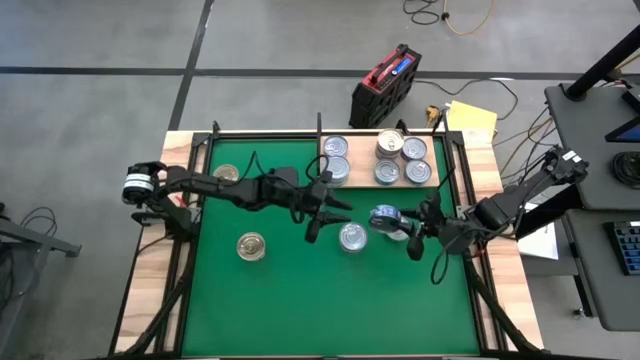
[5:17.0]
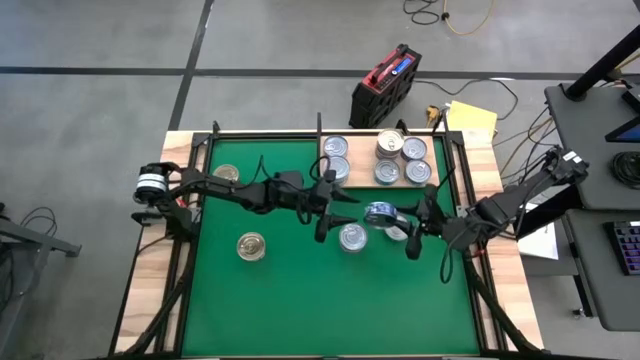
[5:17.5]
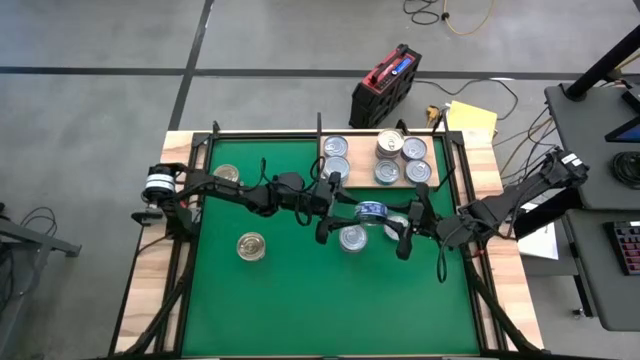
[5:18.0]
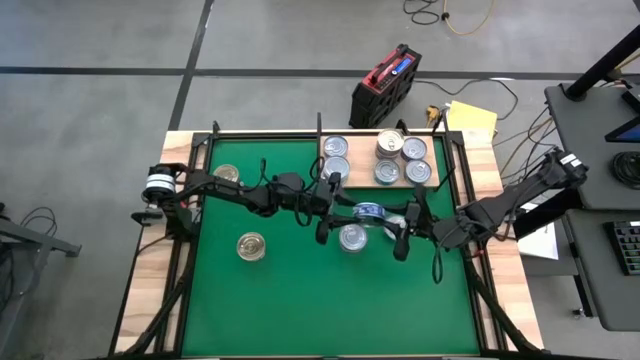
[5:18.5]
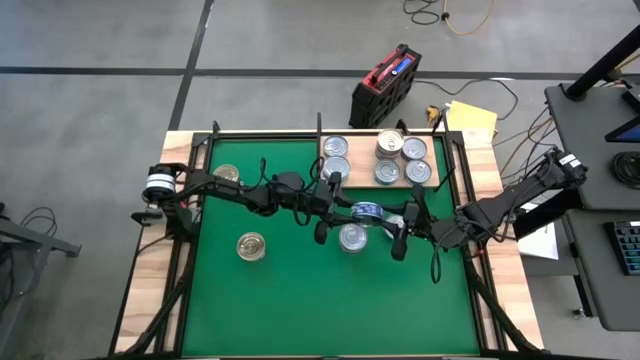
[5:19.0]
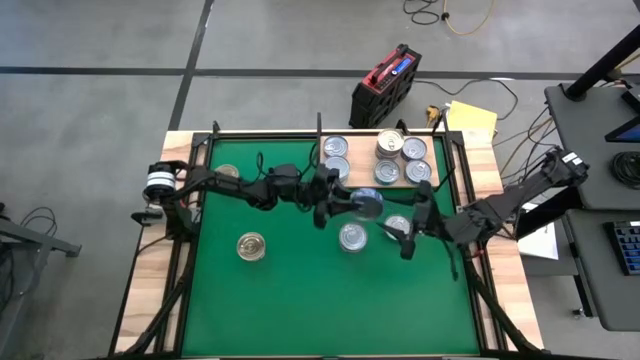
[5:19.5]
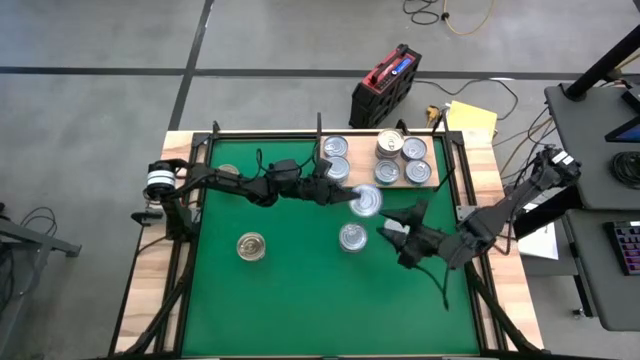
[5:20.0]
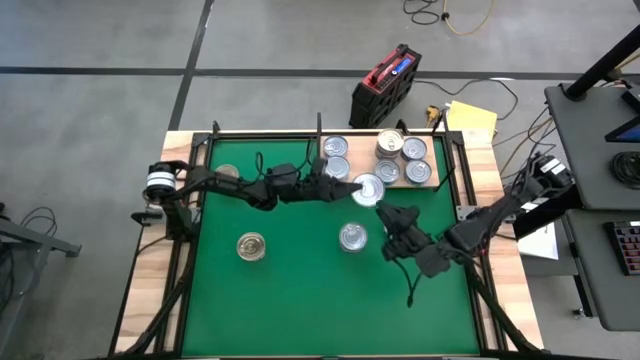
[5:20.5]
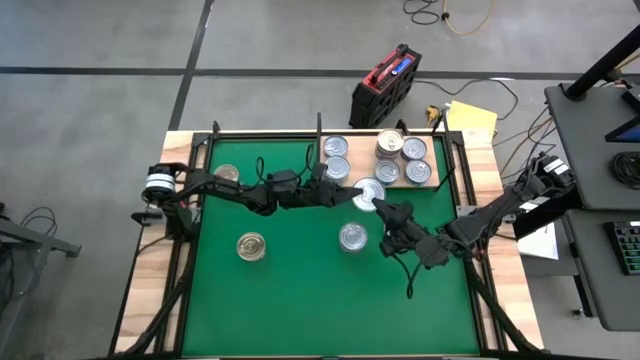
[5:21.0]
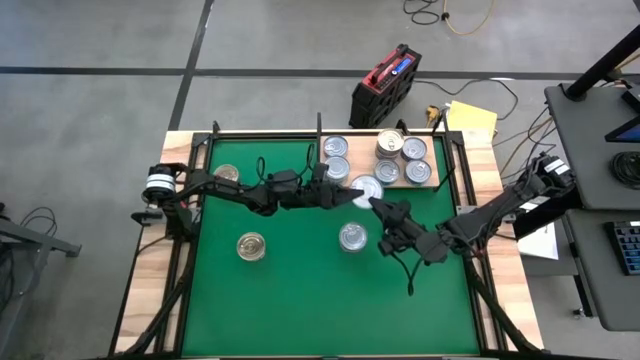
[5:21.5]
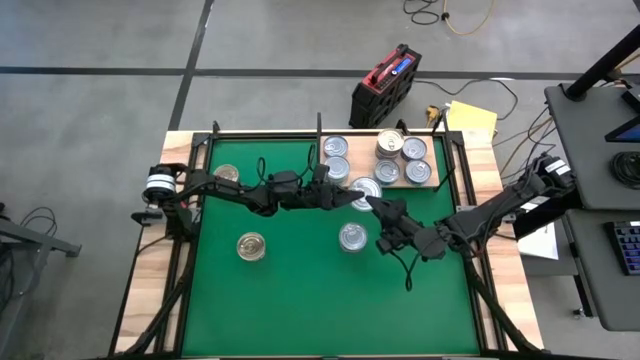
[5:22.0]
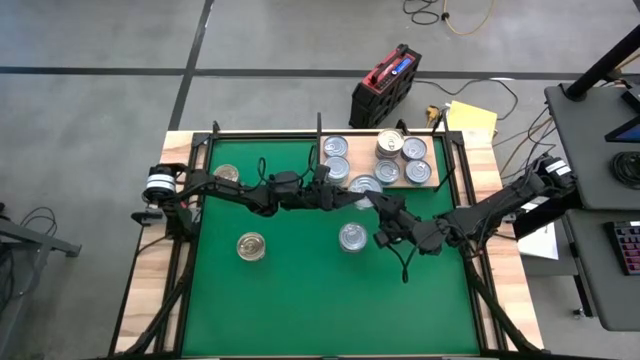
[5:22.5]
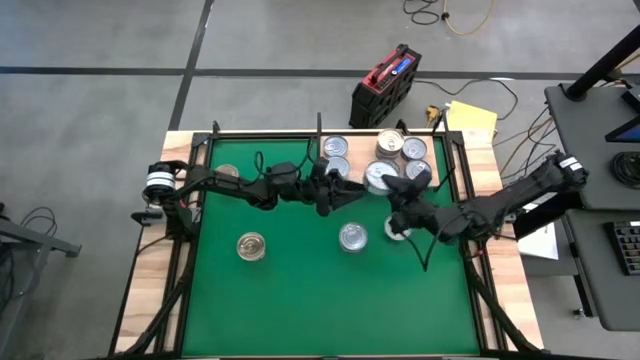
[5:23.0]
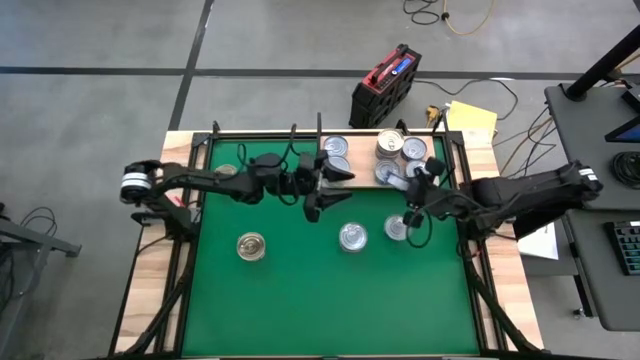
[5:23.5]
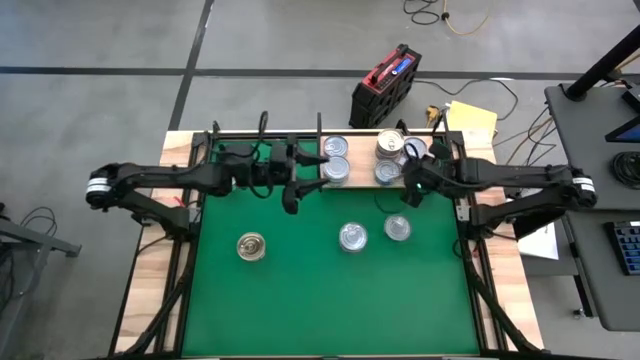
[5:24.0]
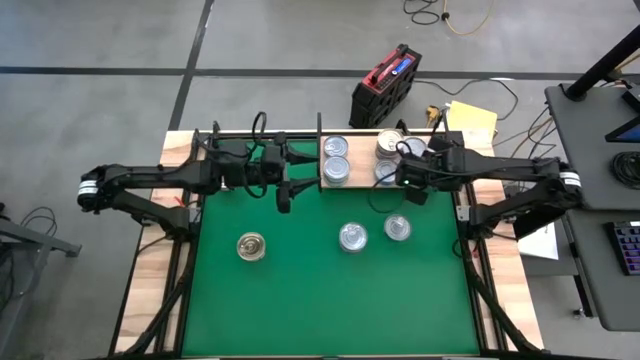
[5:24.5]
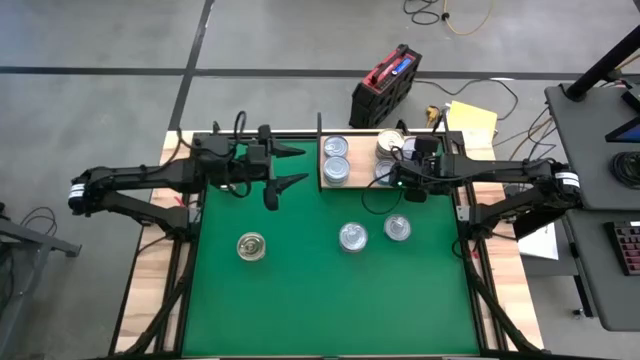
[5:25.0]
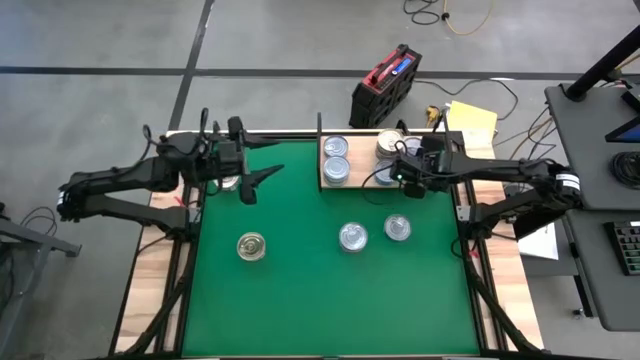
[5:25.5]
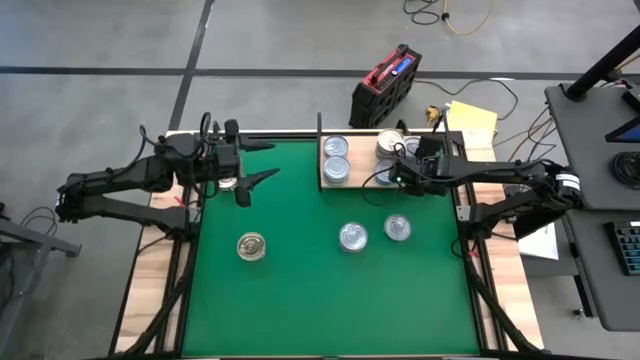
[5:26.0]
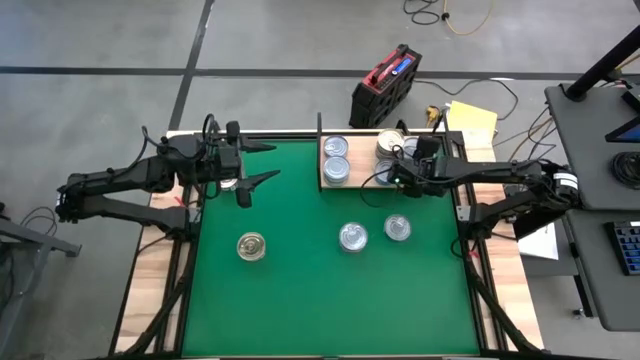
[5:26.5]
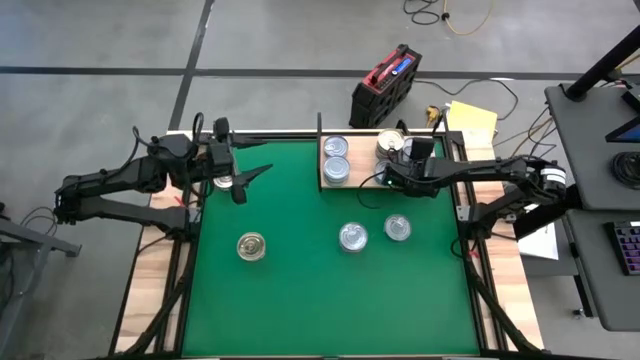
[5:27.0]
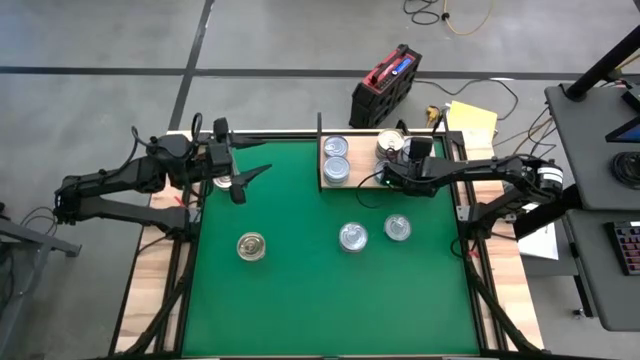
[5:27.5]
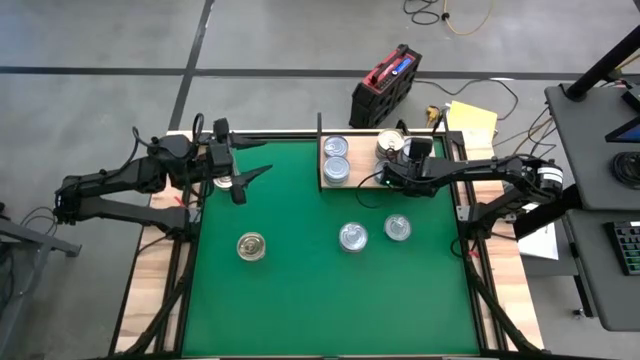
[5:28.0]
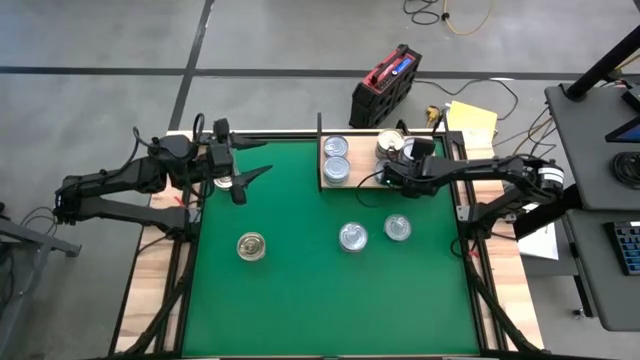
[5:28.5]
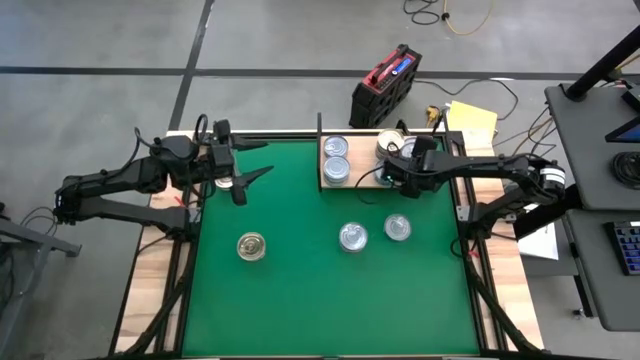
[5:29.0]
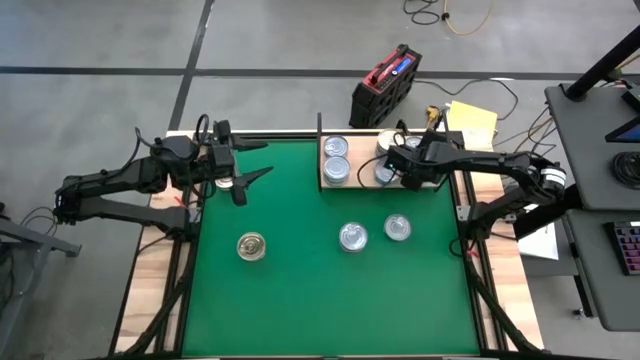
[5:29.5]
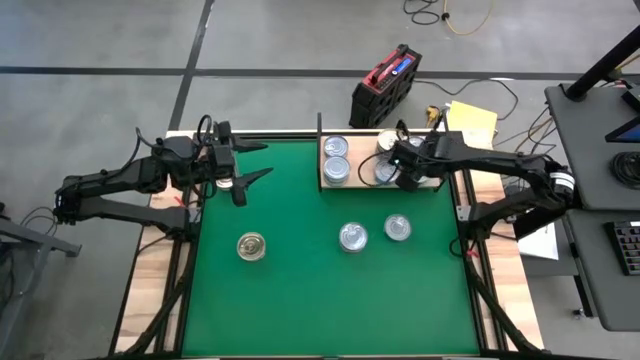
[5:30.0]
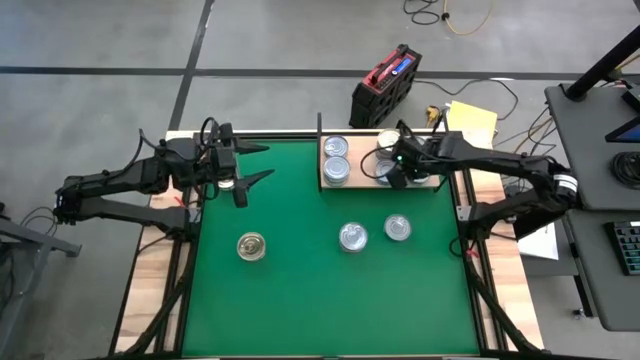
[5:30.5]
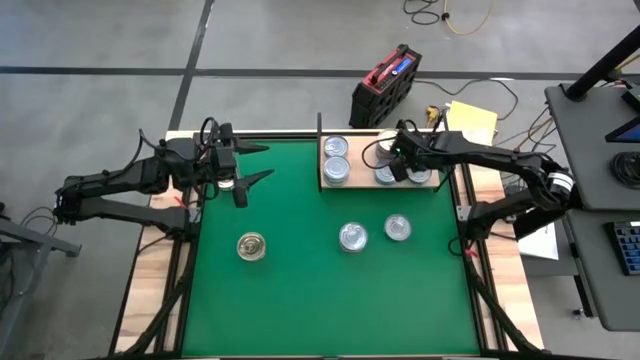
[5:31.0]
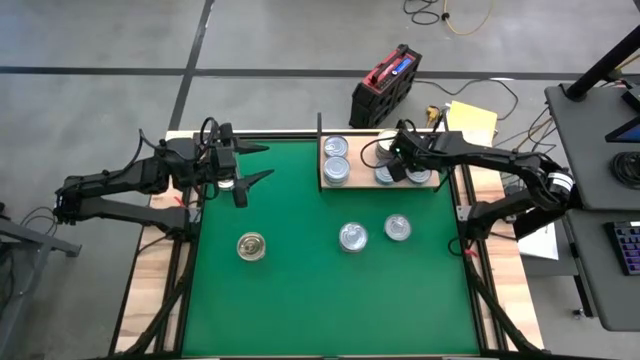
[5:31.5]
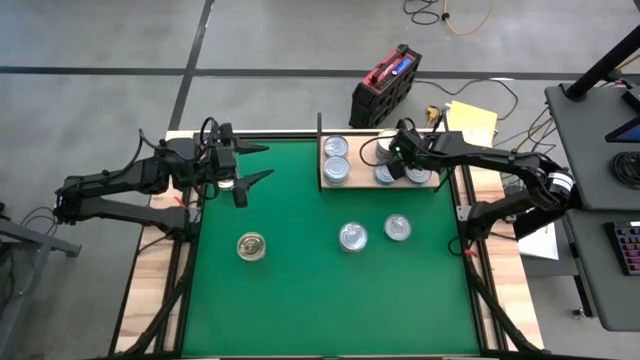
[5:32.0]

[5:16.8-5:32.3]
Task: Stack canned seafood by type on shelf
Stack the blue tuna can on top of the blue tuna can on the shelf

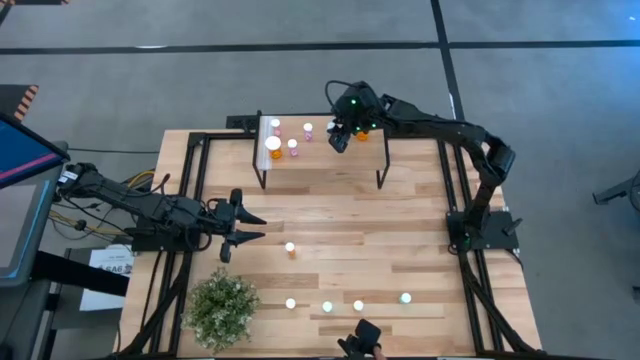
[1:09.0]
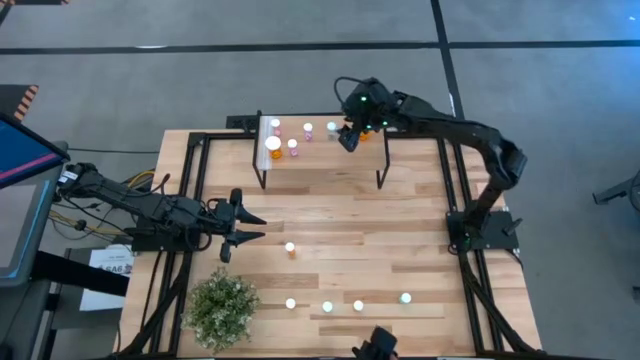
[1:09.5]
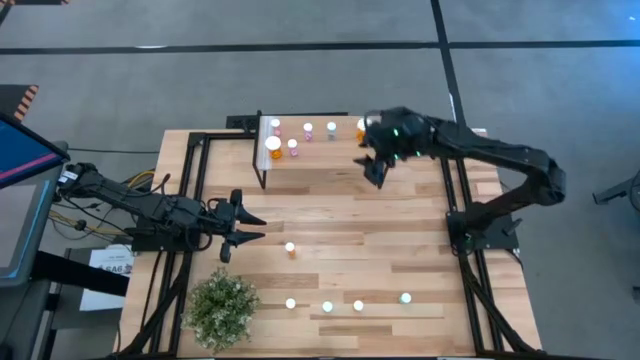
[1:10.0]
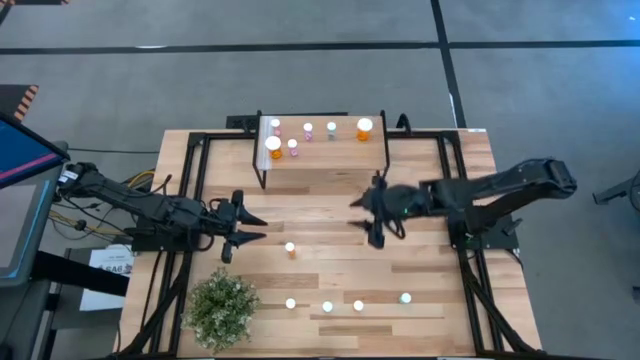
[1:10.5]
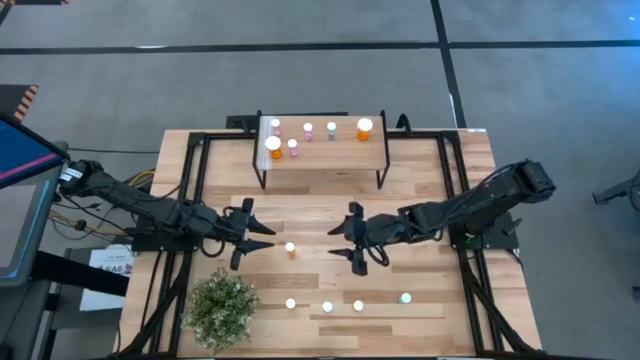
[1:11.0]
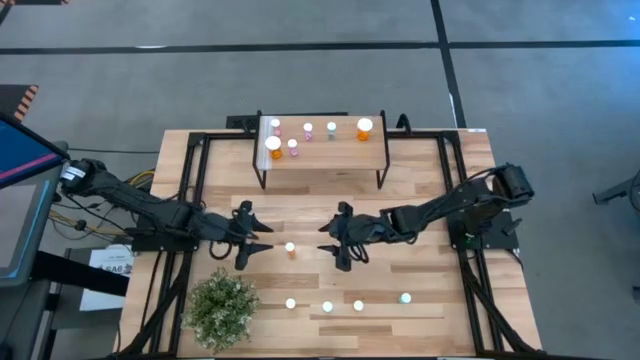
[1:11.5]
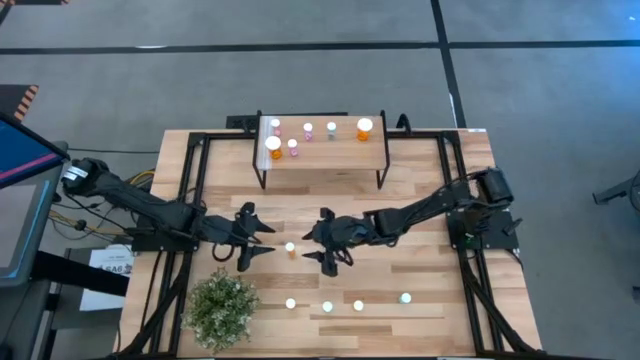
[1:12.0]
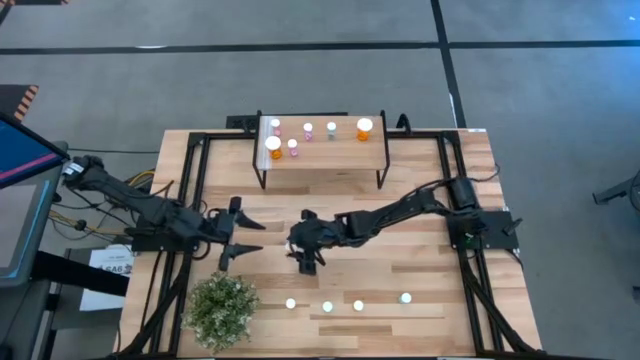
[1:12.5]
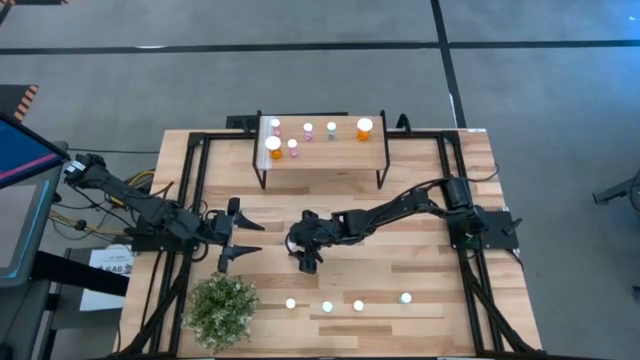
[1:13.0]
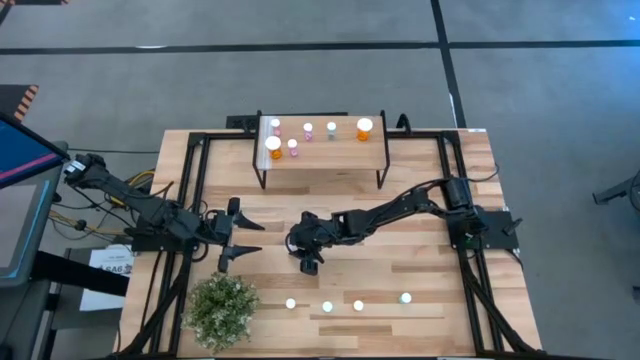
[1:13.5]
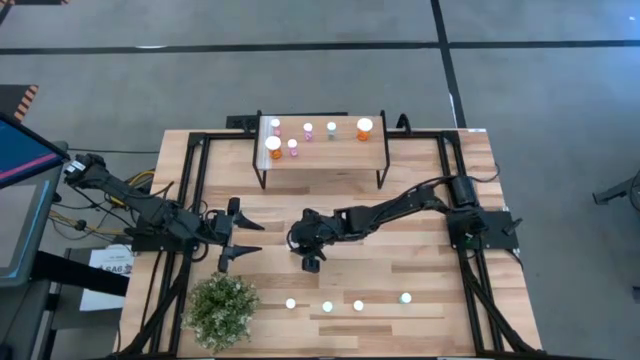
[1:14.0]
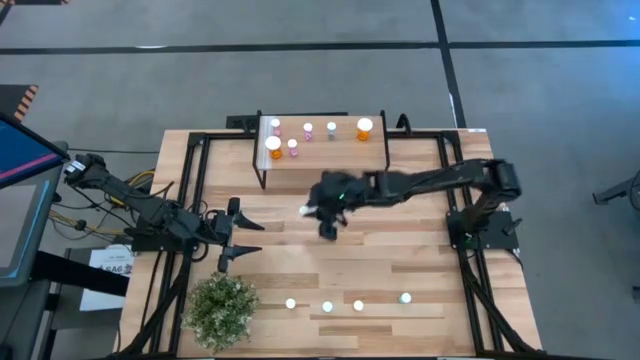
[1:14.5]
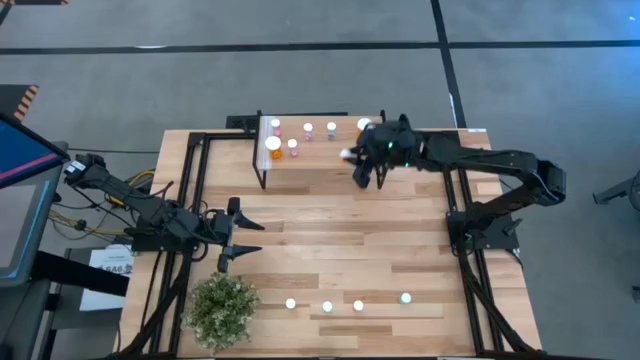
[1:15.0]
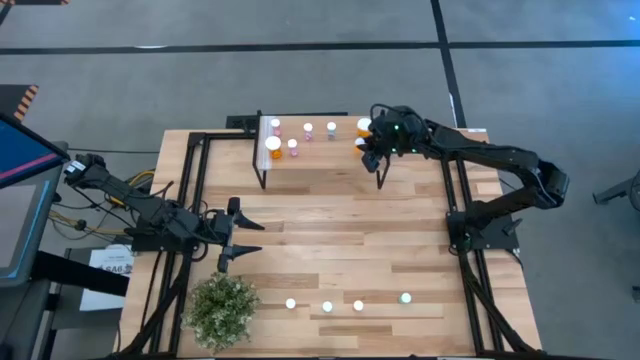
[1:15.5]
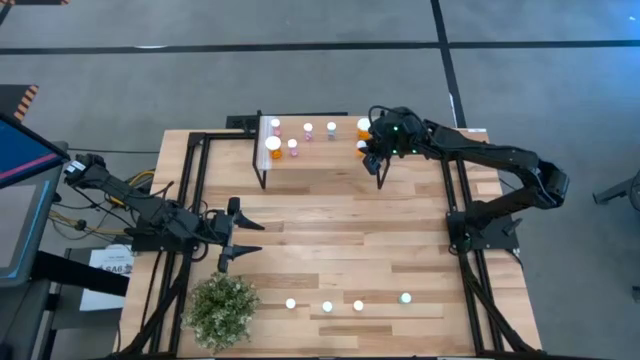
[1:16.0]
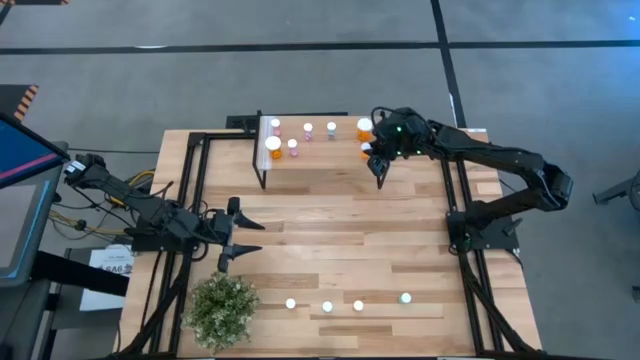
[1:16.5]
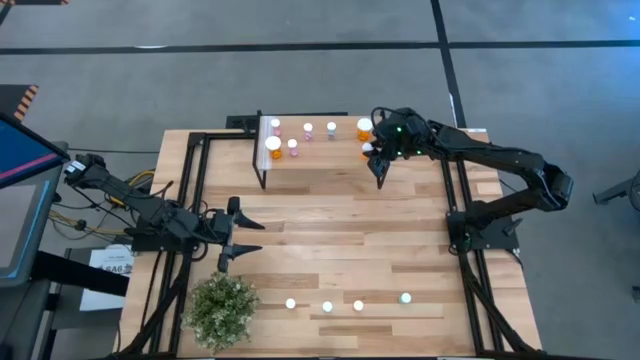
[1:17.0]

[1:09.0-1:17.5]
Task: Pick and place medicine bottles onto shelf by color
Put the small orange pill bottle on the shelf
